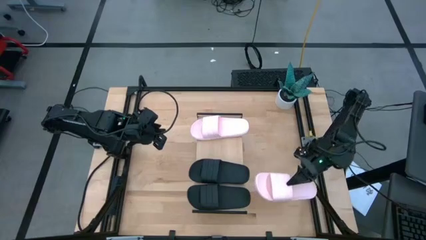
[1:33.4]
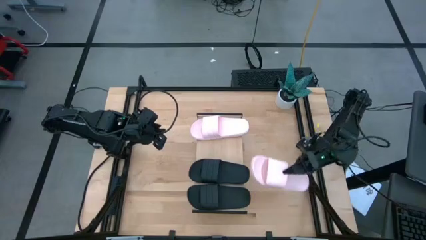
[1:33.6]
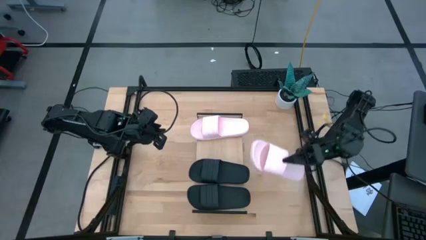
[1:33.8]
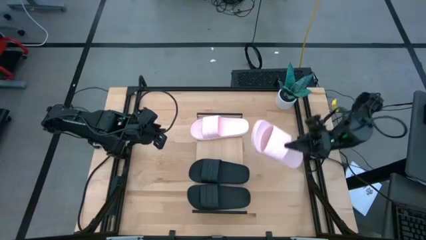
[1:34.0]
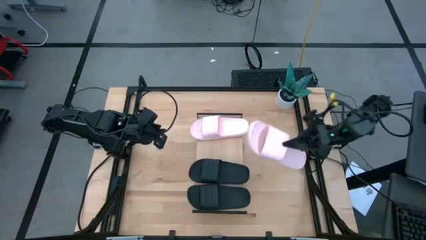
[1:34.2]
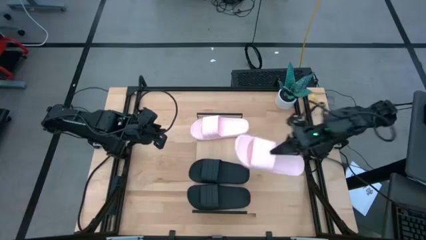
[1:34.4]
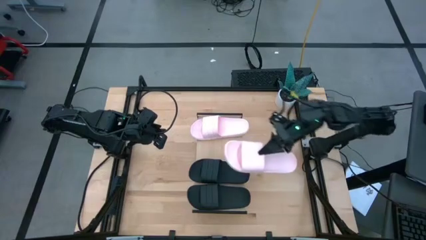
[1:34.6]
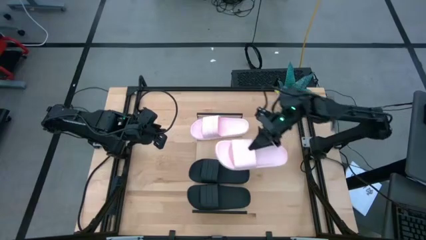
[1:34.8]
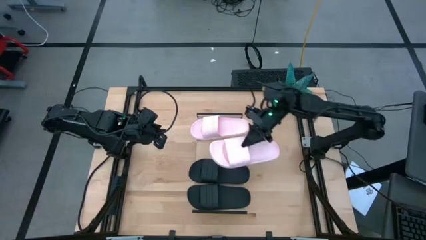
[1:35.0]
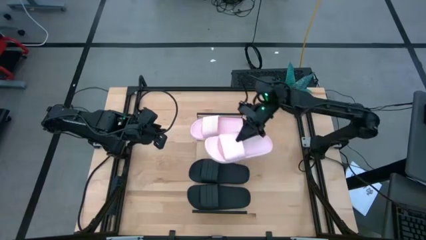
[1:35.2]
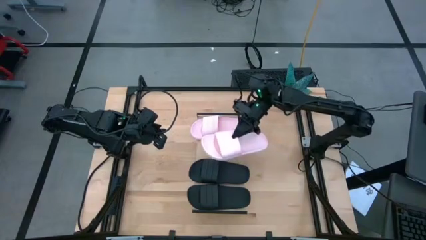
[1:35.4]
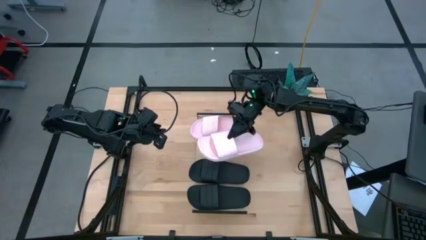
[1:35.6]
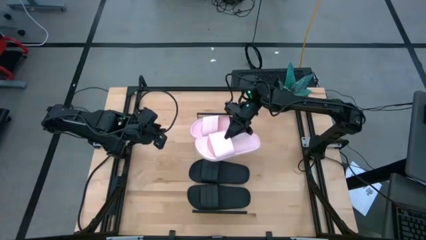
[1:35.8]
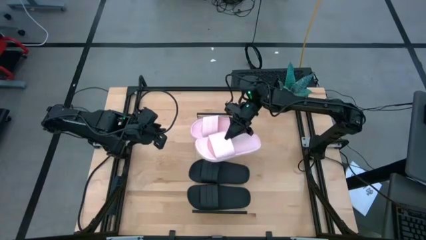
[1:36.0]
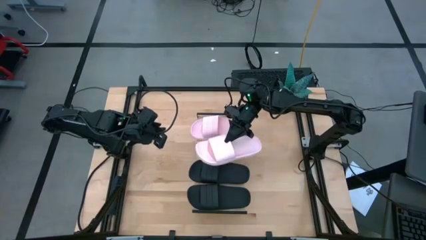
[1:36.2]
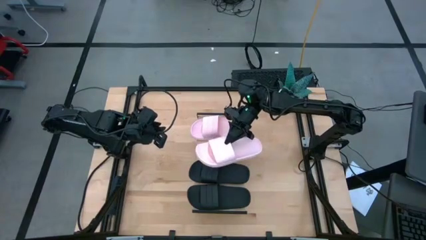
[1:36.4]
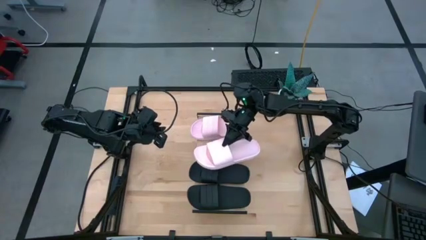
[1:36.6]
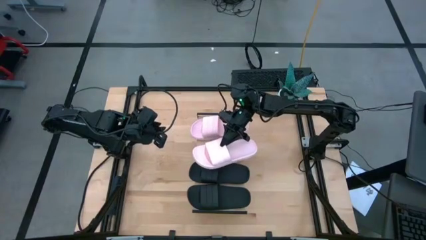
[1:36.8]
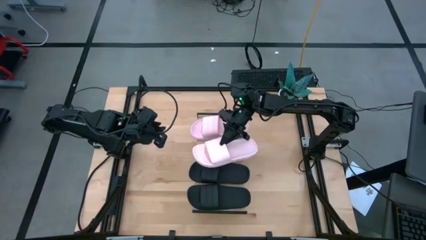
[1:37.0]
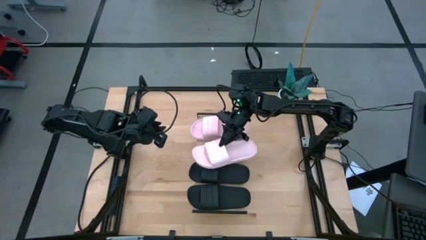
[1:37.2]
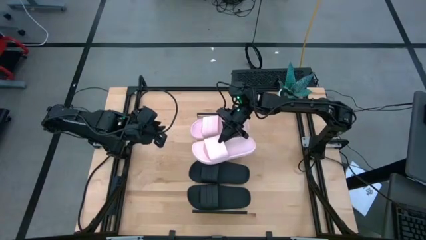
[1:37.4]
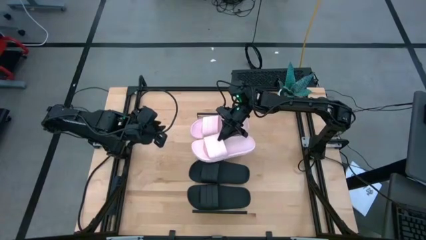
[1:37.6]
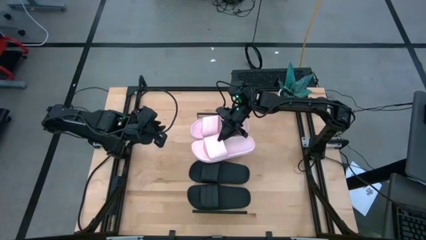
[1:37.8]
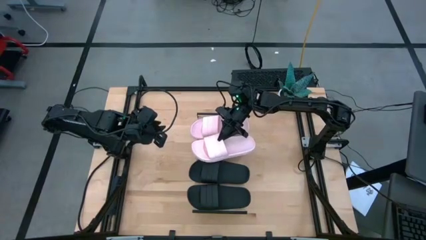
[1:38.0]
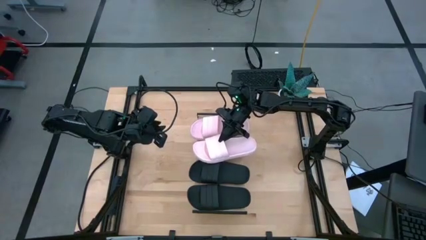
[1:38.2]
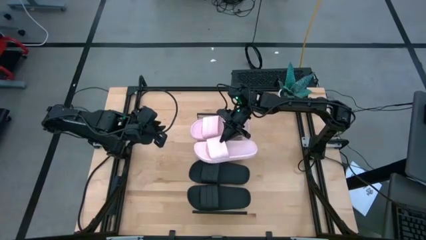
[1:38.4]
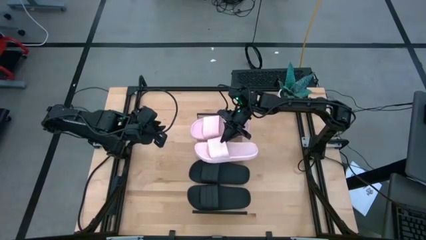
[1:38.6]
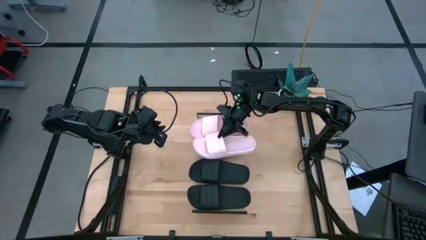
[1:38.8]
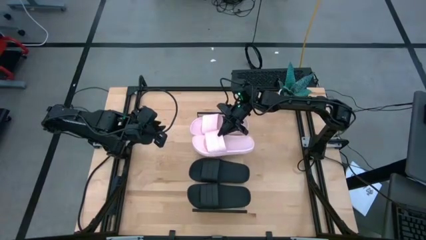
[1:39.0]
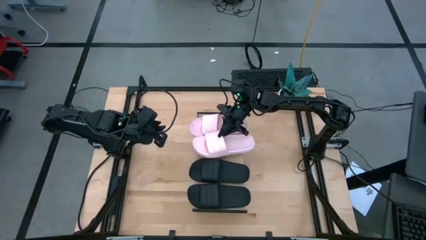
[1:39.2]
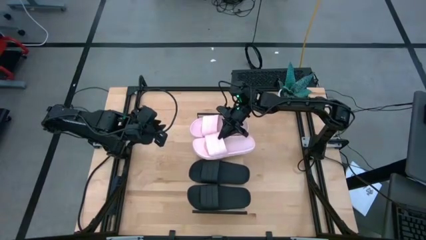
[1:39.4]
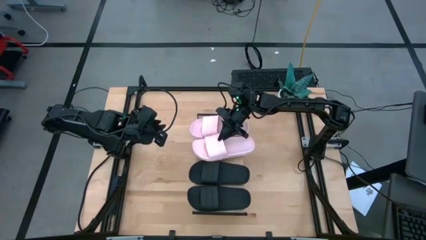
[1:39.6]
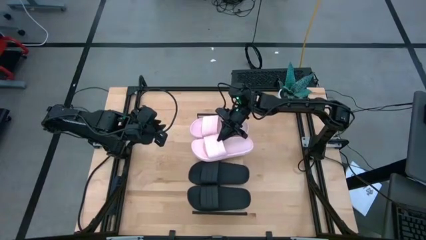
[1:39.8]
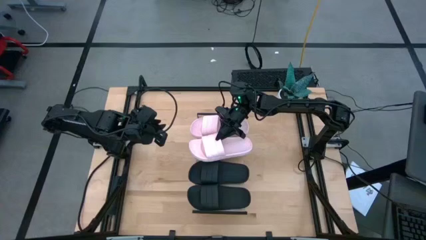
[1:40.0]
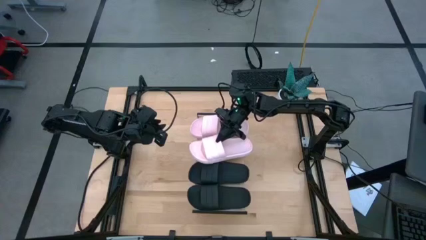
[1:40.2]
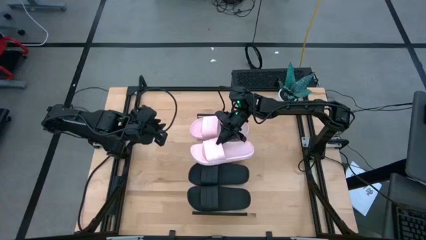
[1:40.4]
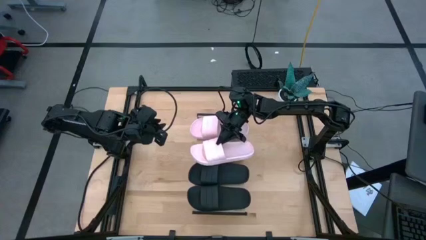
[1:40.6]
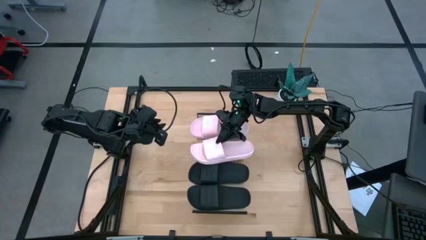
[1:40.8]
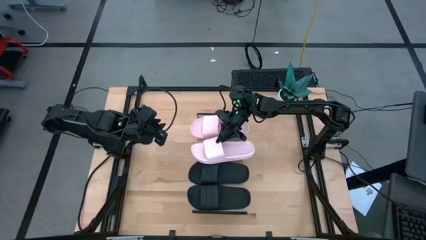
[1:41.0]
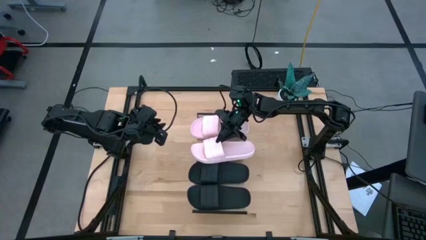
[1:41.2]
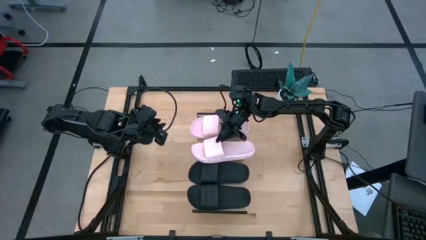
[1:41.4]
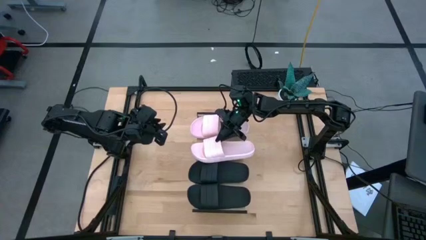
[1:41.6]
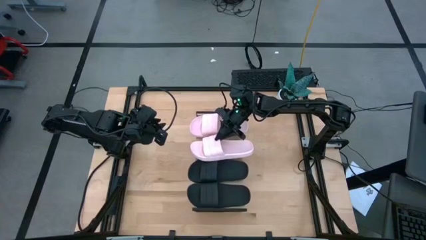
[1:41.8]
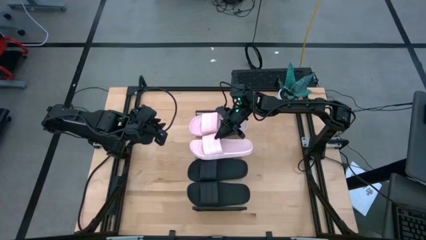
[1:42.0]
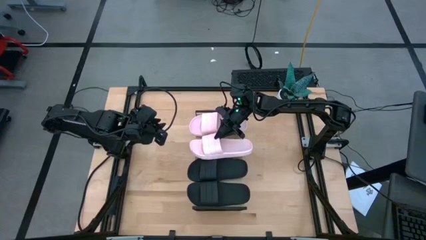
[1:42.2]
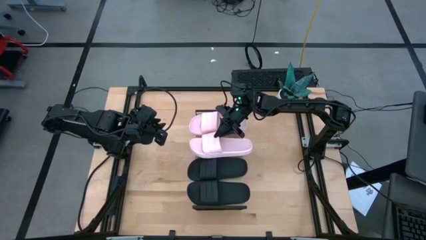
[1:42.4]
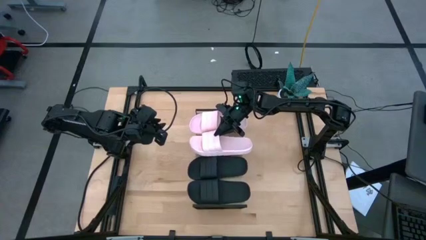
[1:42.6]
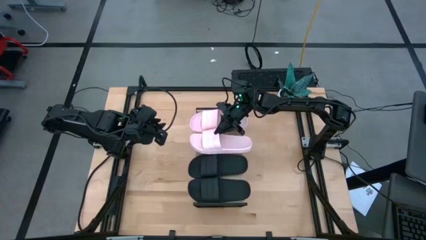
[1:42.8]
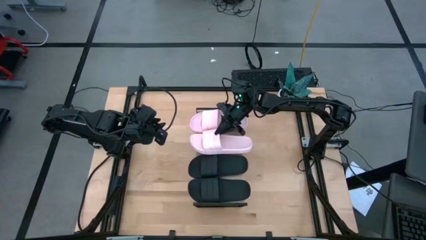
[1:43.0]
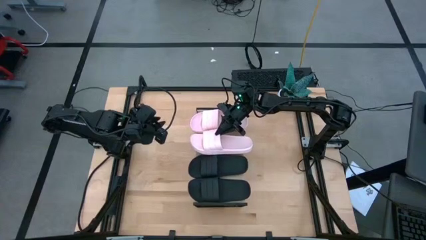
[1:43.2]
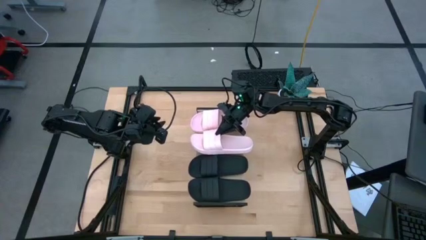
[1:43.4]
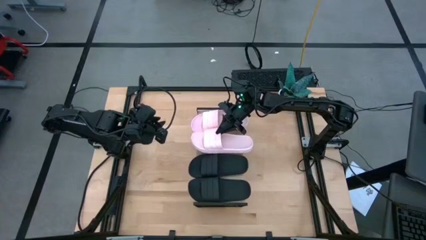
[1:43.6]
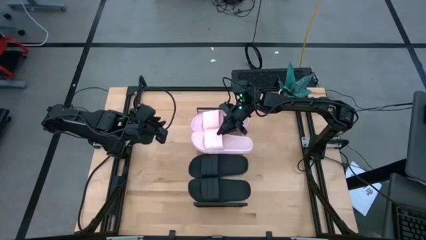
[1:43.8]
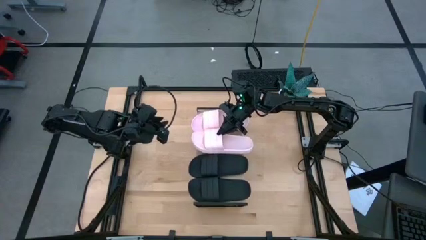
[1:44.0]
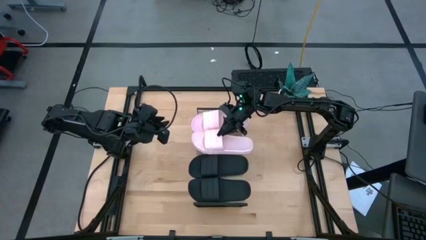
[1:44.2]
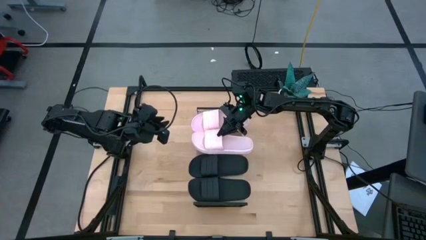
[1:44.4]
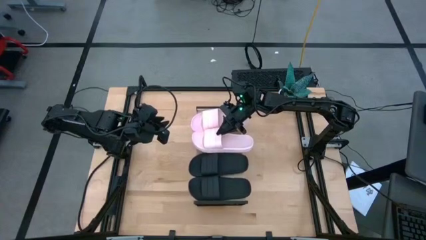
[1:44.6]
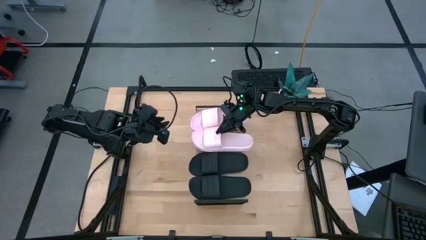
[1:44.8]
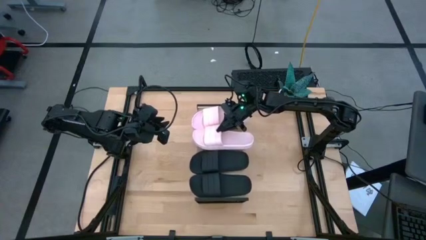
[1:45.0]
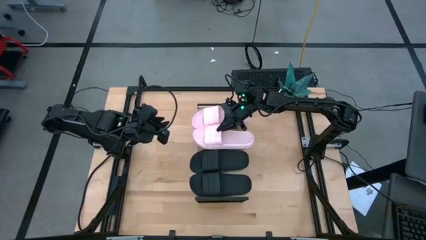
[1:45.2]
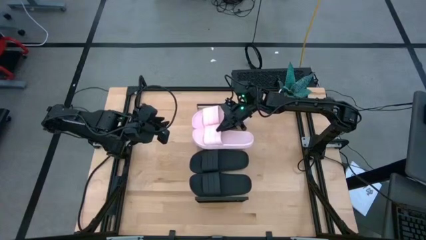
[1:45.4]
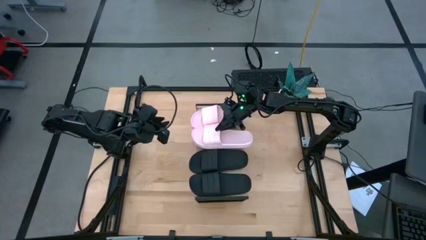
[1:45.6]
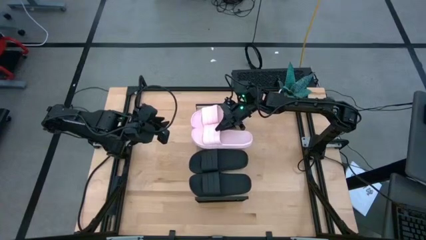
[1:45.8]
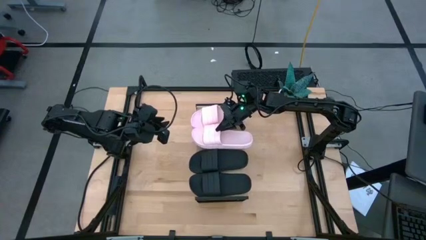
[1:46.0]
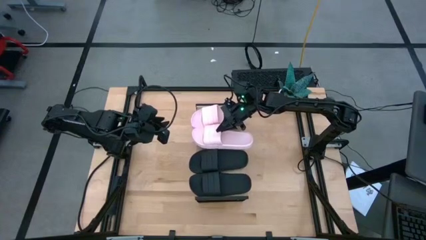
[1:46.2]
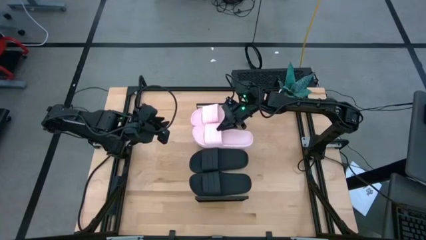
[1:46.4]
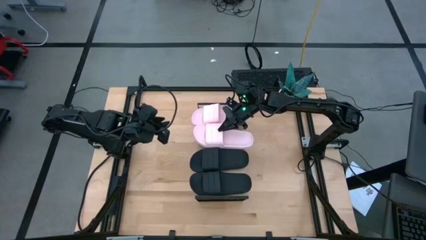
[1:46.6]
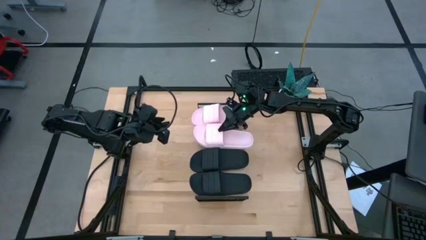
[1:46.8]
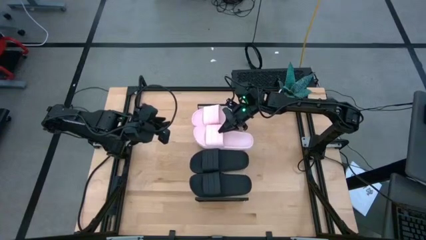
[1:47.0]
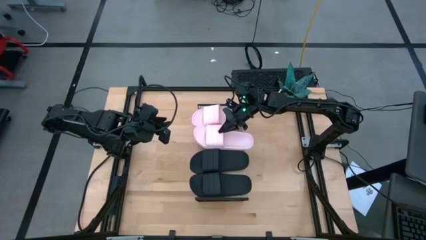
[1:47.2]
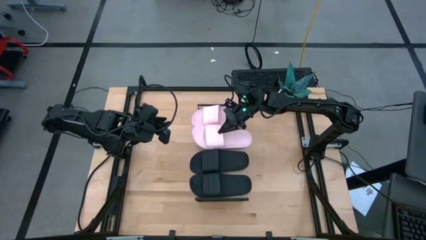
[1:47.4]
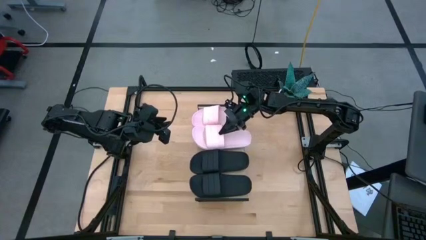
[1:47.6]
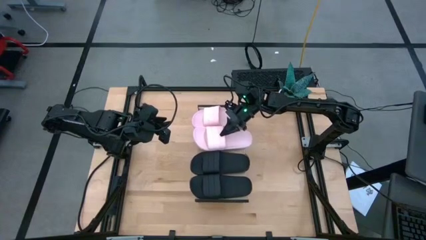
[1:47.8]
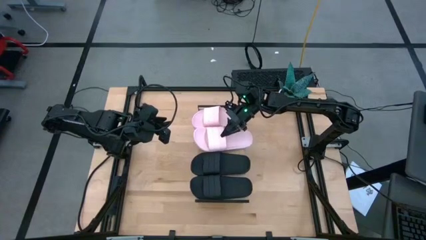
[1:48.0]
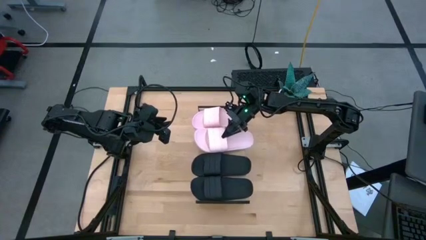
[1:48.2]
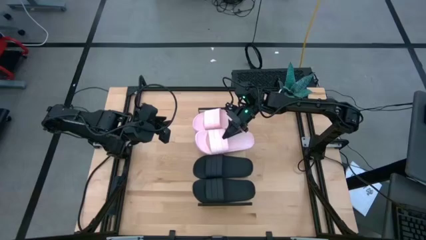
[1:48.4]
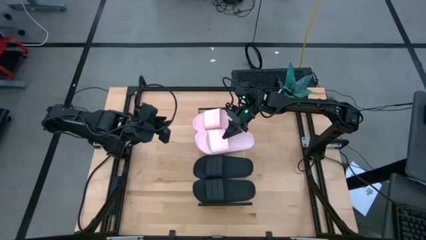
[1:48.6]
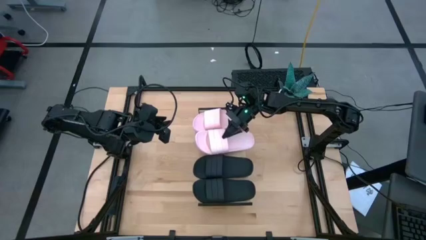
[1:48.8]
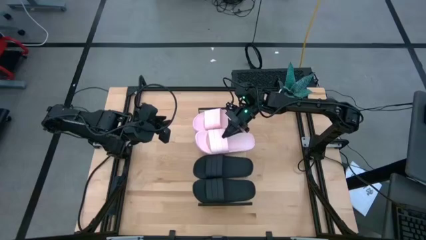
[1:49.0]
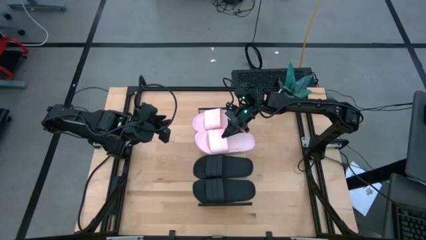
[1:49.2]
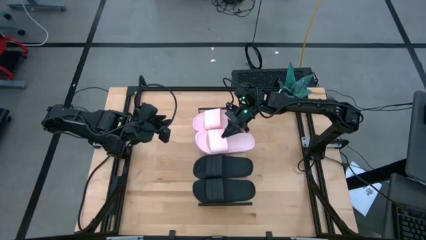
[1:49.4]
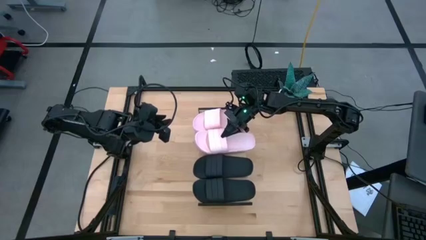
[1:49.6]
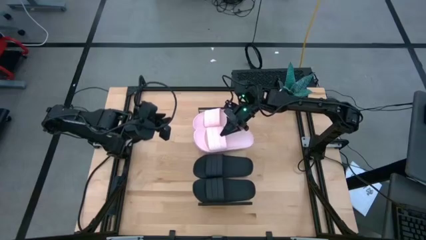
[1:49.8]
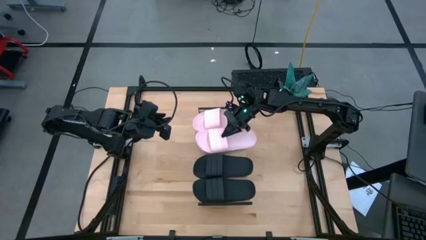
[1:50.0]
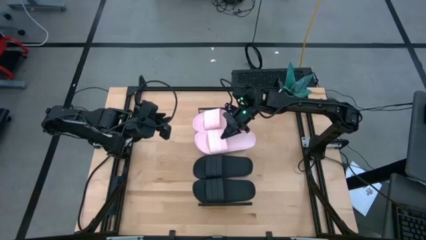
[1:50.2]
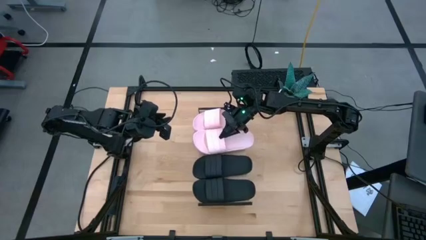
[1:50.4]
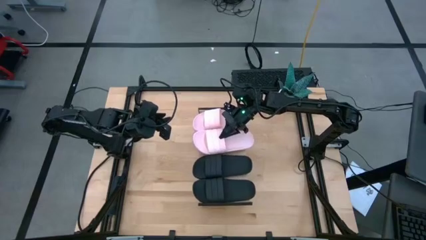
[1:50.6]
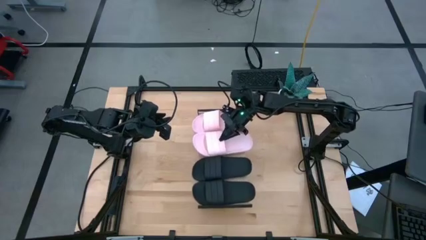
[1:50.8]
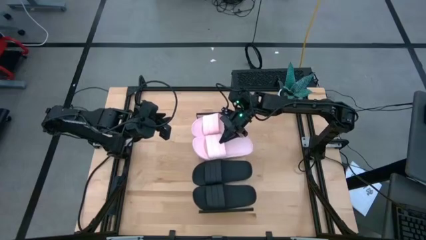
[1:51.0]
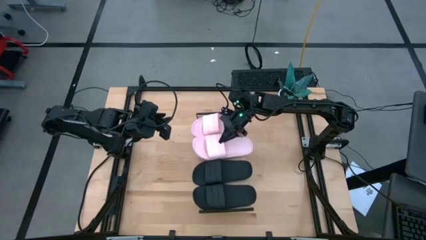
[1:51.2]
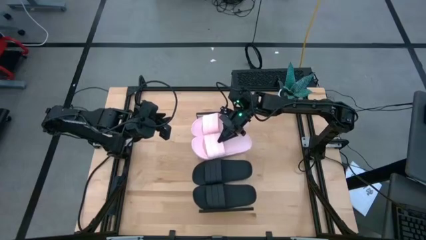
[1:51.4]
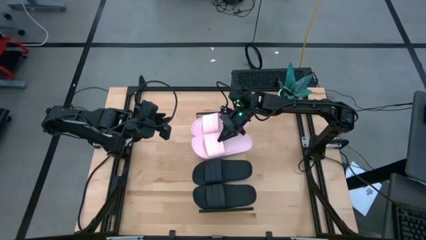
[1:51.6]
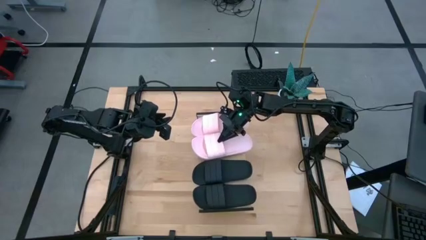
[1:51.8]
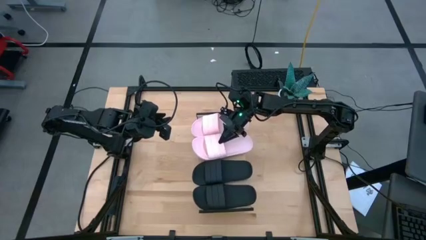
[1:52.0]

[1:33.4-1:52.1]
Task: Pick and place slides into the shelf
Put the pink slides on the shelf
